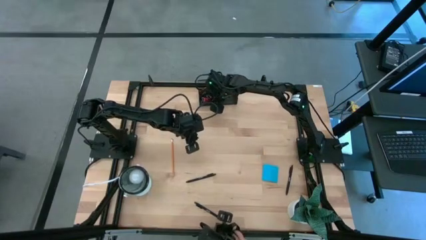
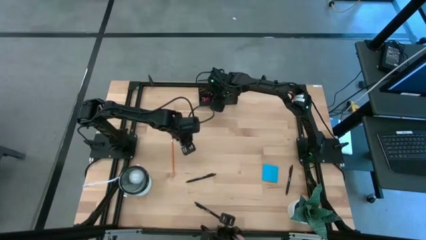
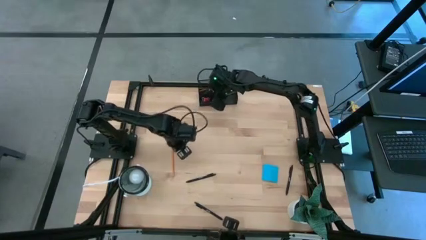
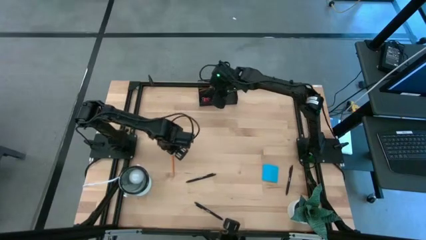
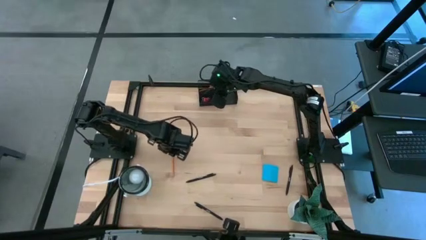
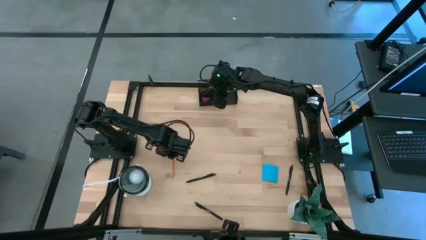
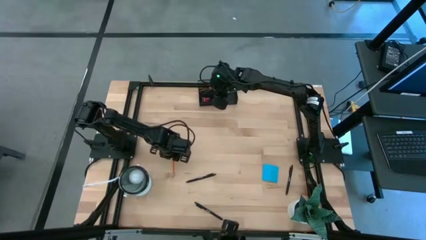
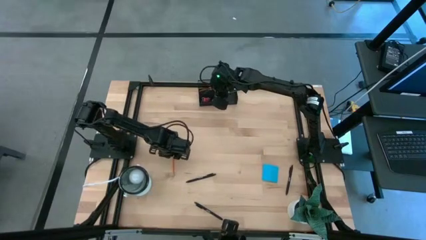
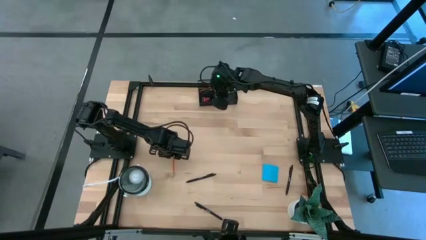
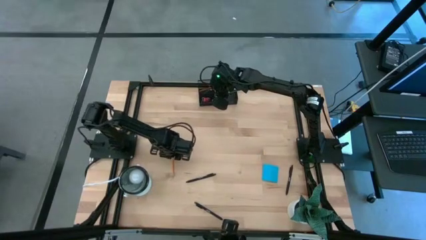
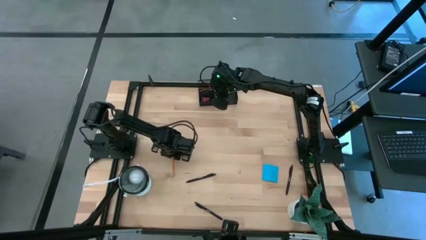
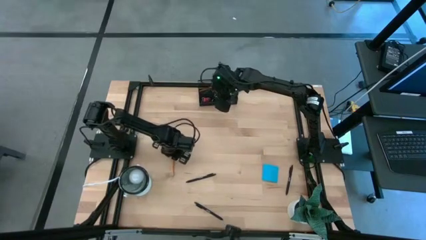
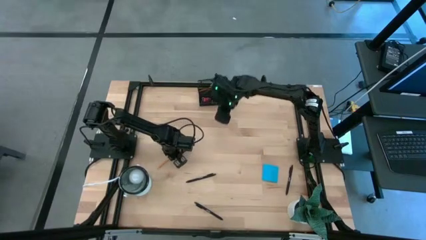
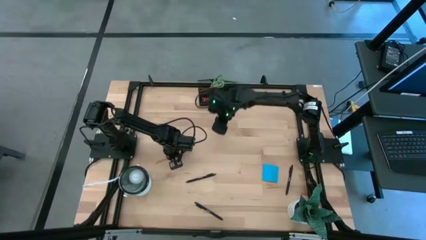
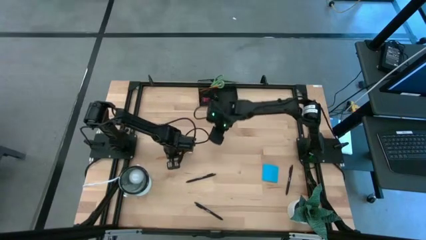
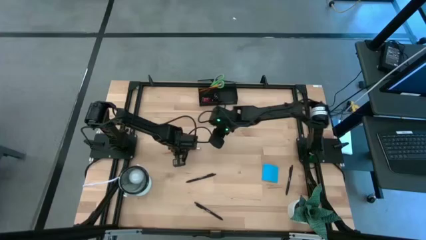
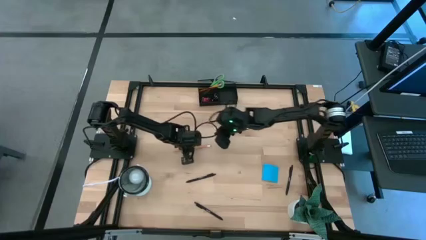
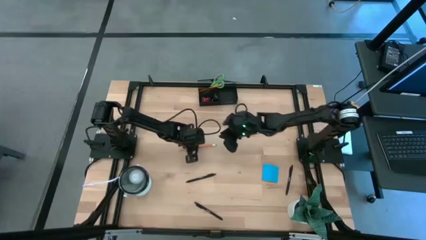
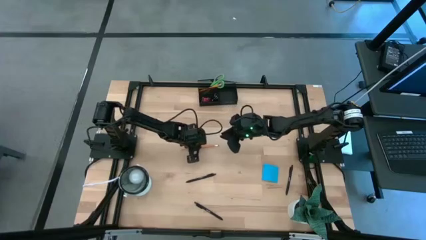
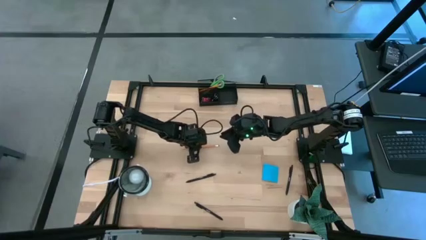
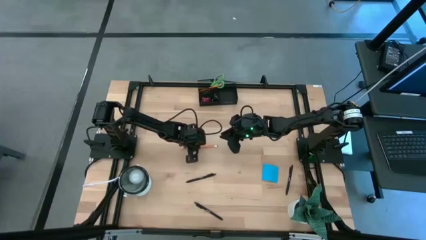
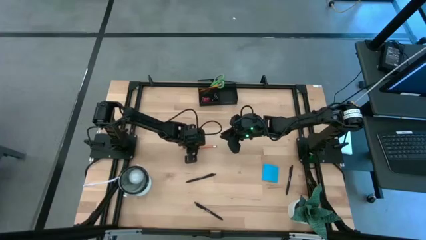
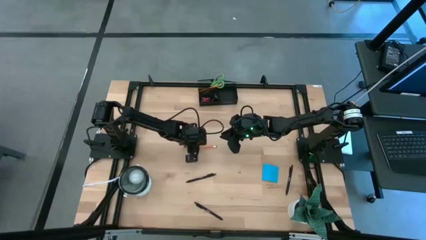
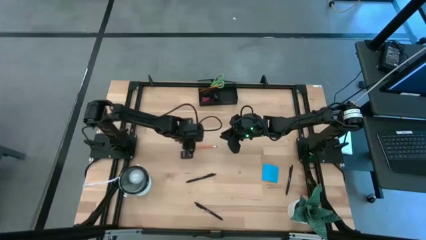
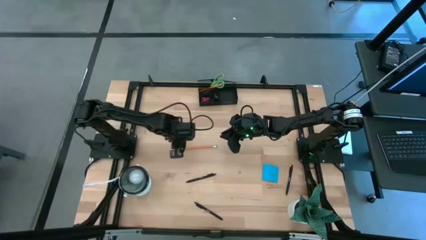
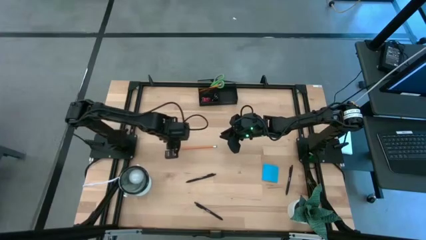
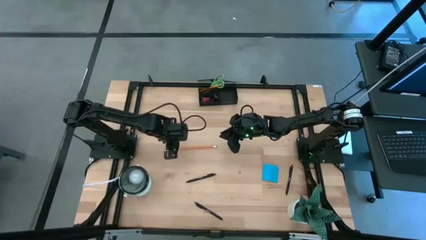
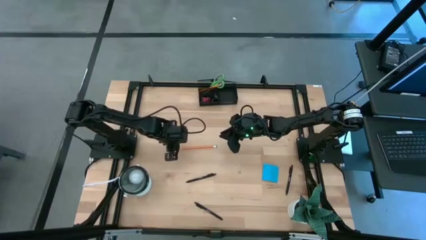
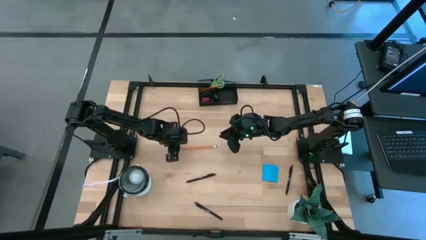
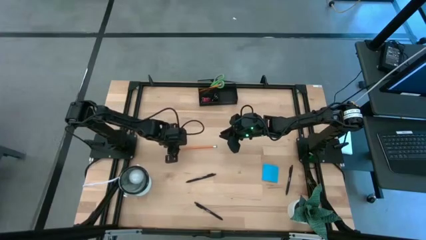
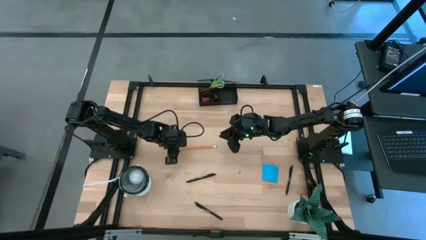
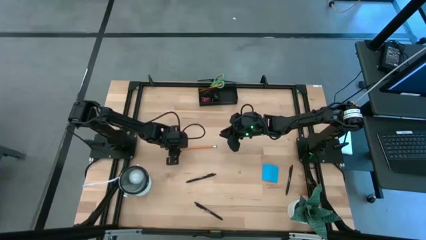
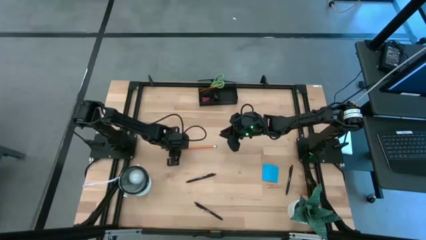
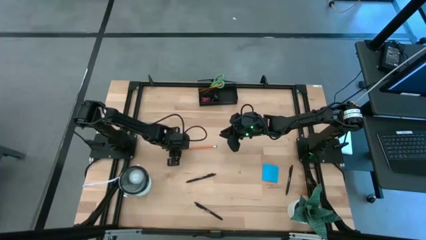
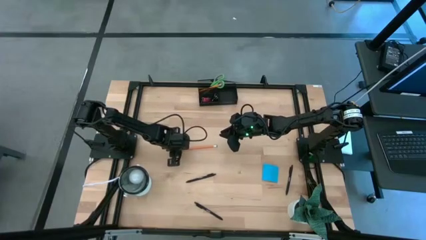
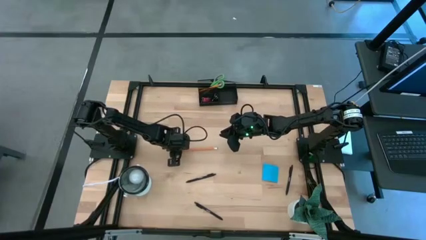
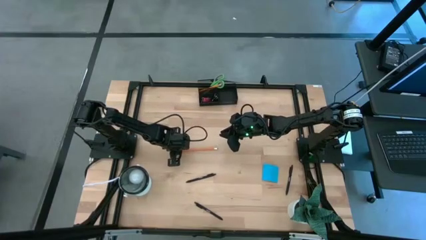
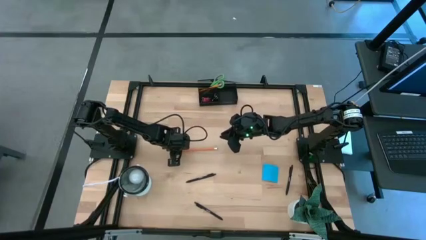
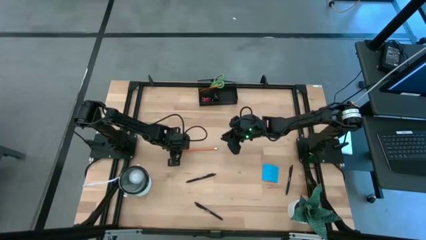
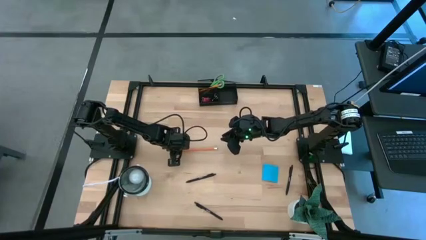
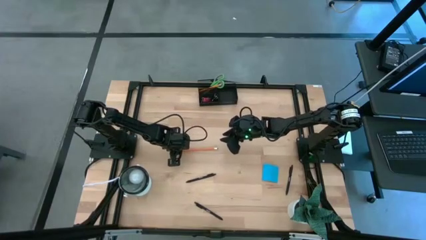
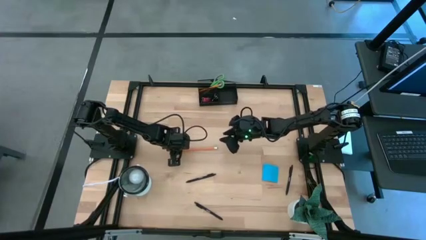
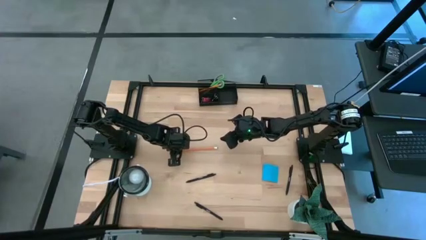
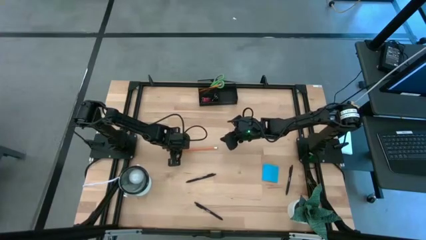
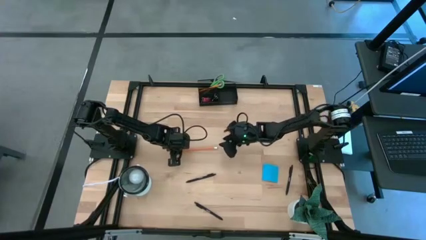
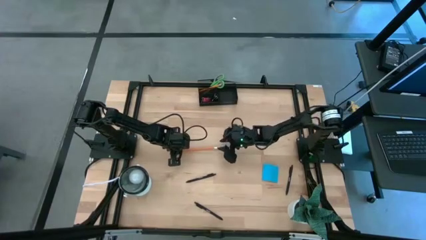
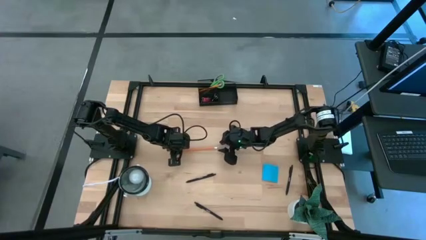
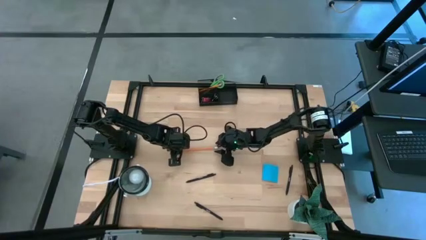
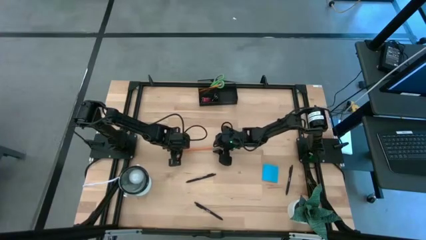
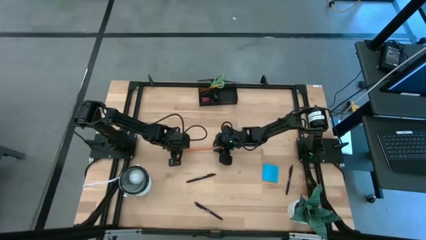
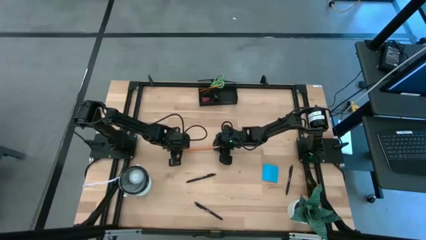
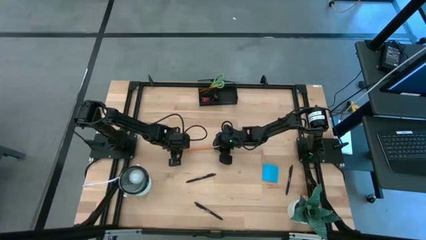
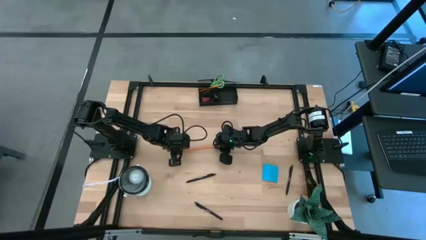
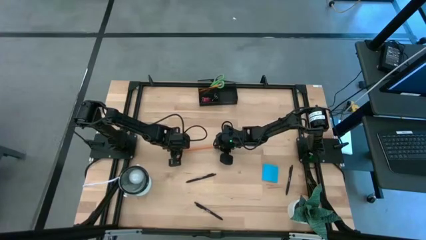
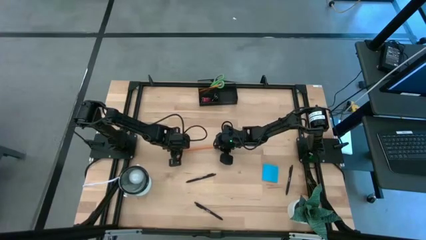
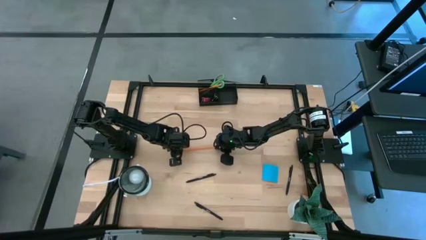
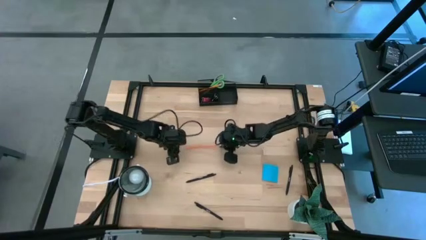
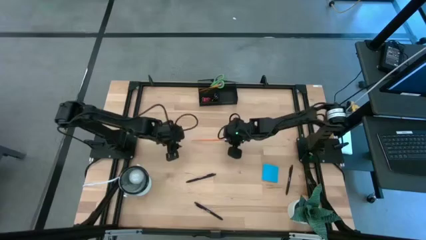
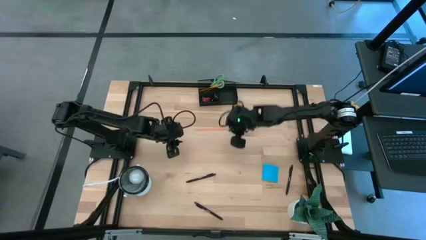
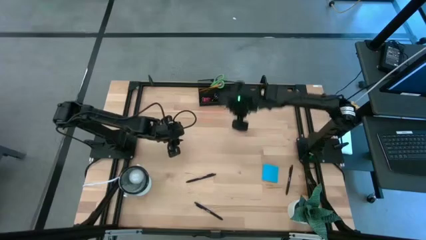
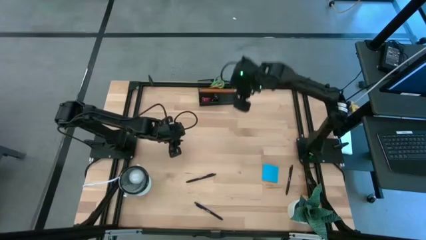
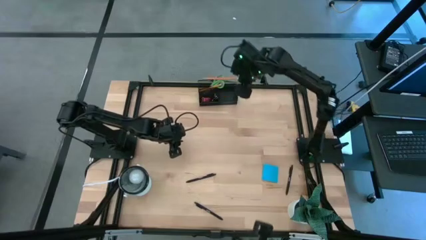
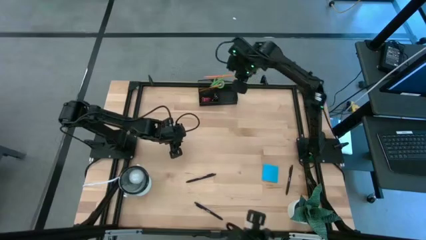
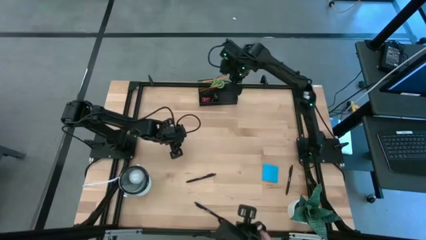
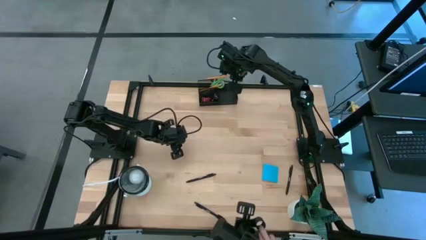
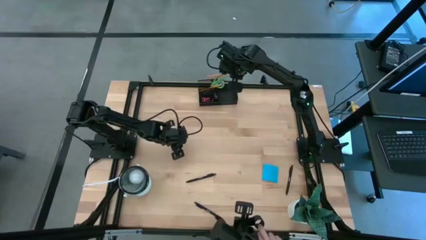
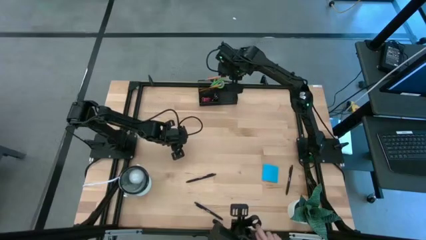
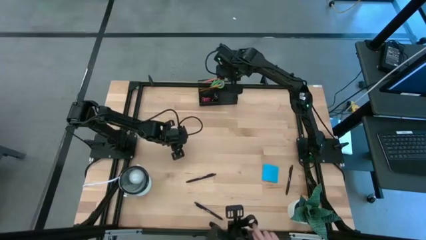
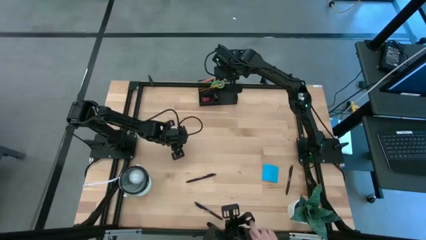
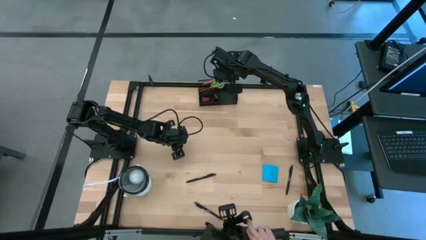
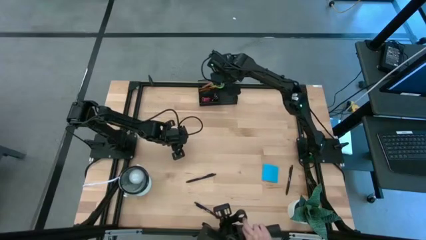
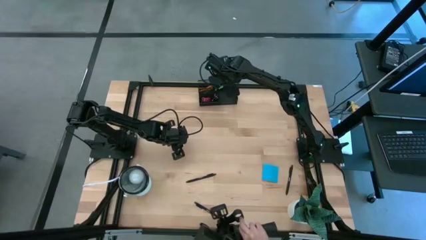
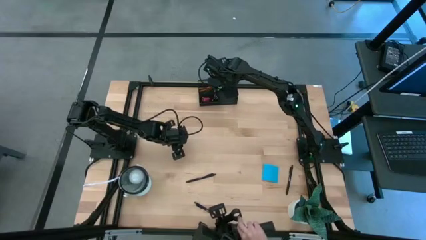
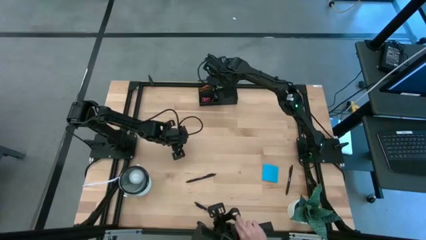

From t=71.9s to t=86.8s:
Task: Pick and place office supplies into organizer
Put the orange pencil into the desk organizer
